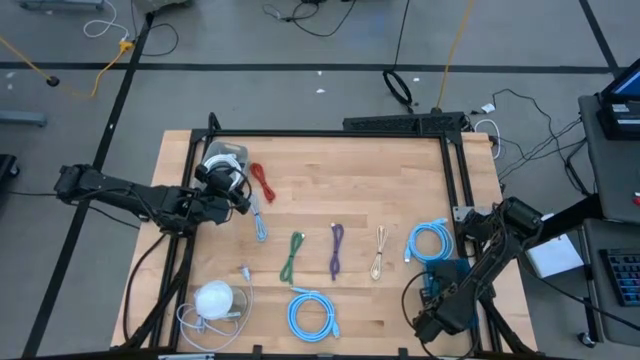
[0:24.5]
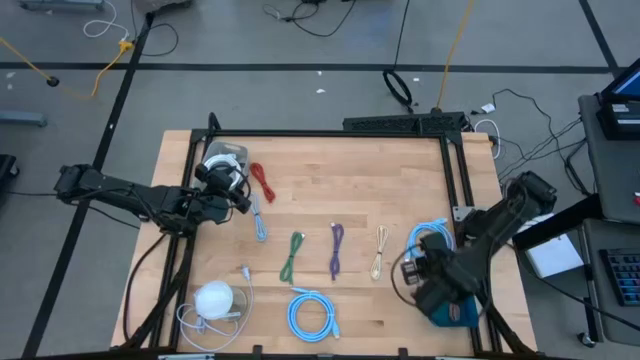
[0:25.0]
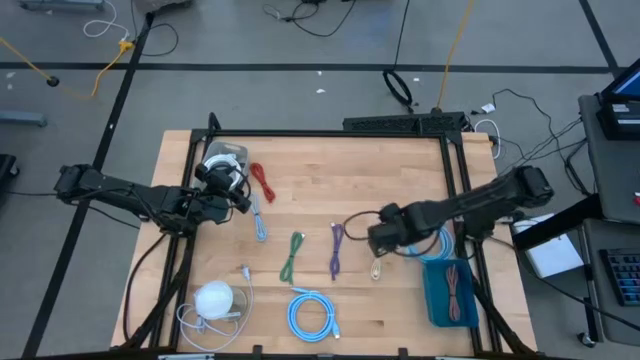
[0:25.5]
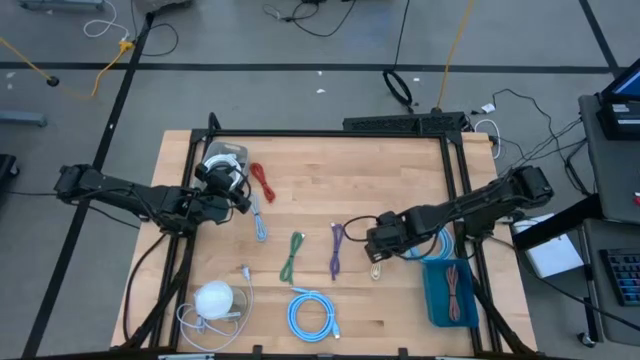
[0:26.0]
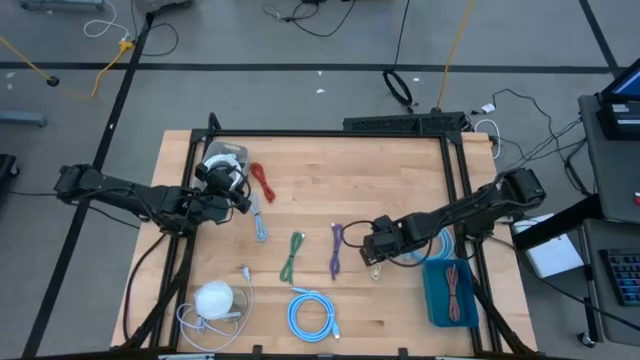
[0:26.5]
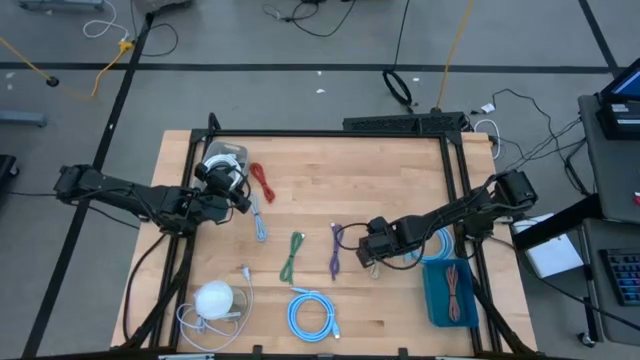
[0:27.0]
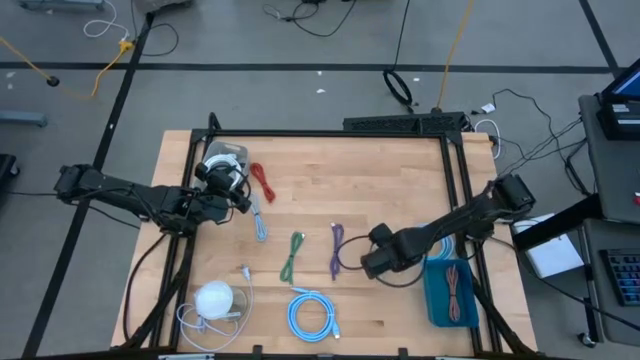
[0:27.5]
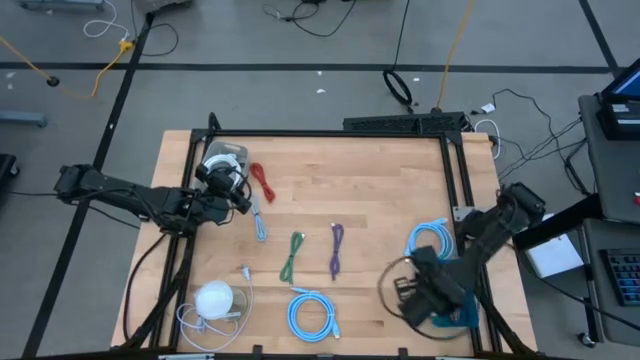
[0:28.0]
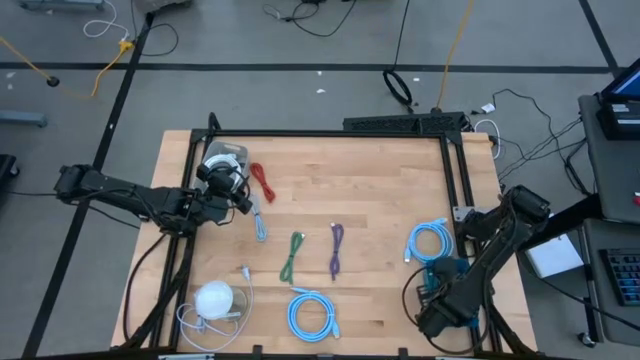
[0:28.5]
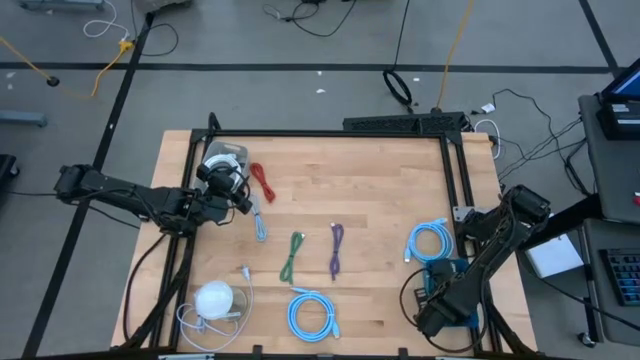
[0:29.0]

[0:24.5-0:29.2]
Task: Pick & Place USB Port
Put the white USB cable into the blue basket

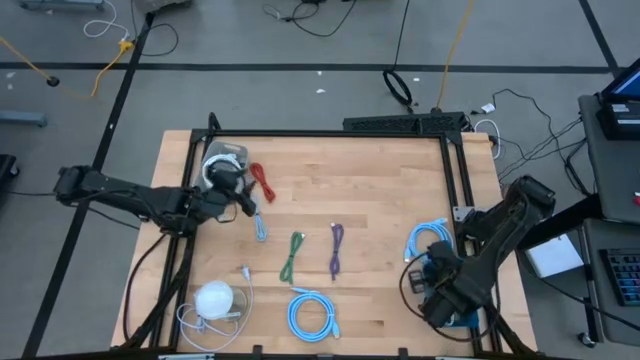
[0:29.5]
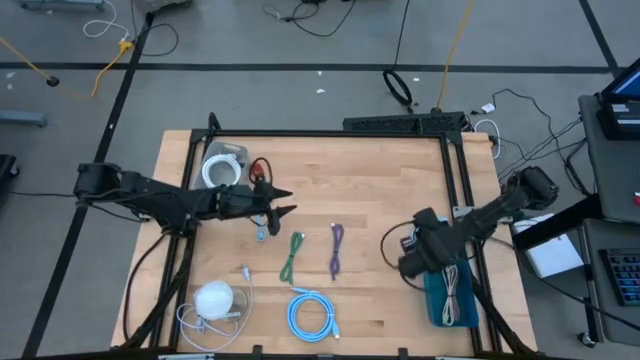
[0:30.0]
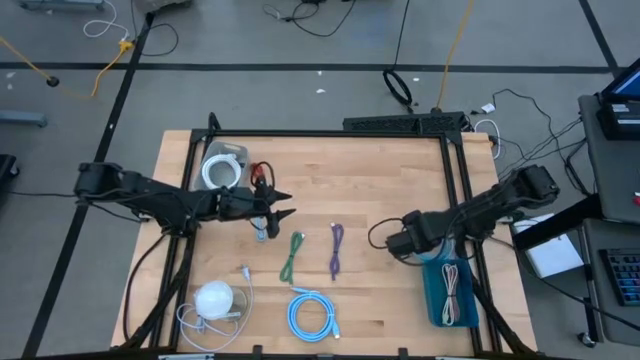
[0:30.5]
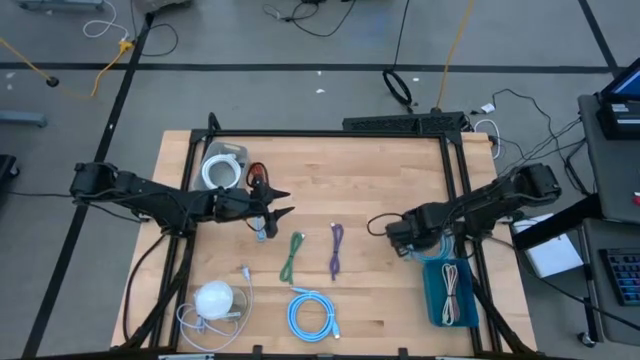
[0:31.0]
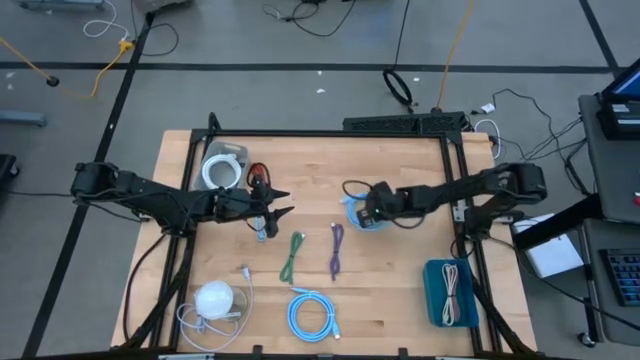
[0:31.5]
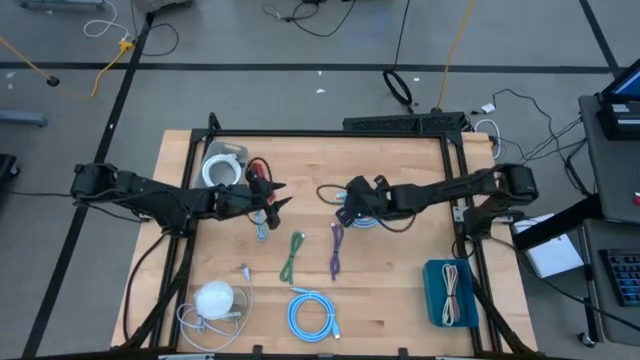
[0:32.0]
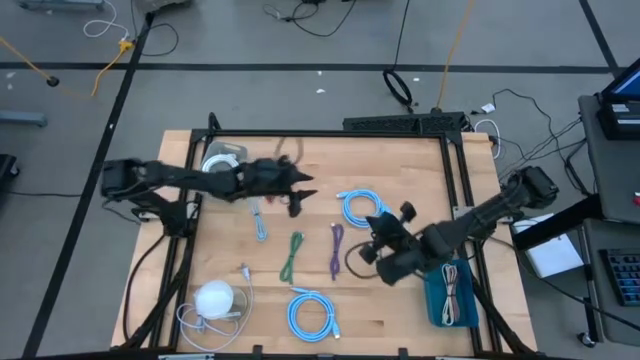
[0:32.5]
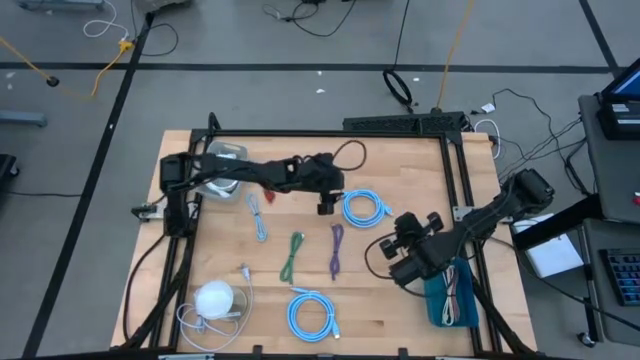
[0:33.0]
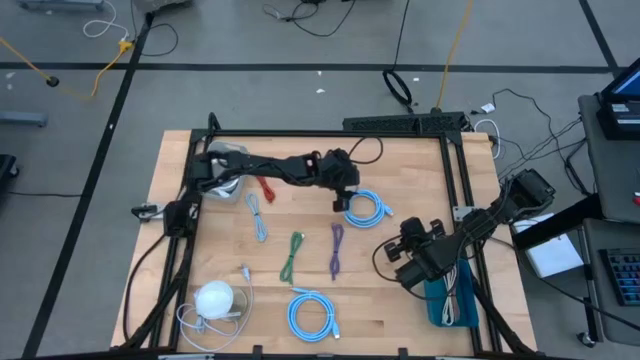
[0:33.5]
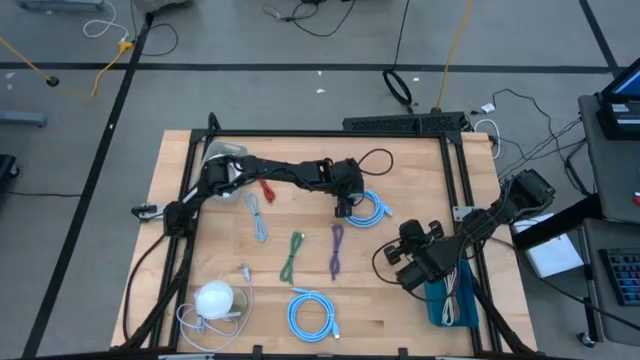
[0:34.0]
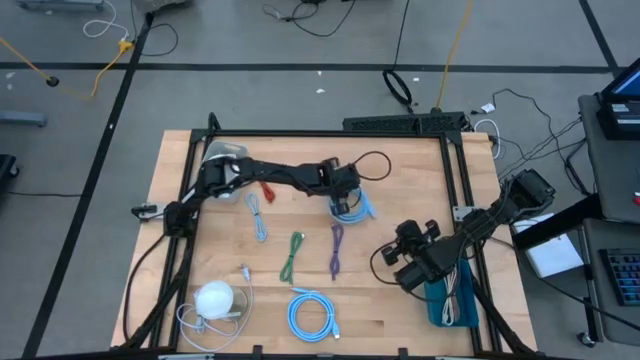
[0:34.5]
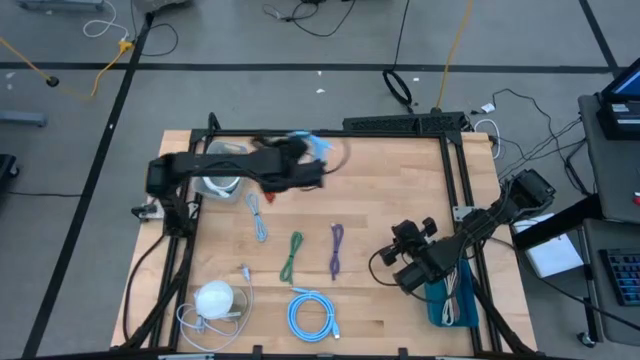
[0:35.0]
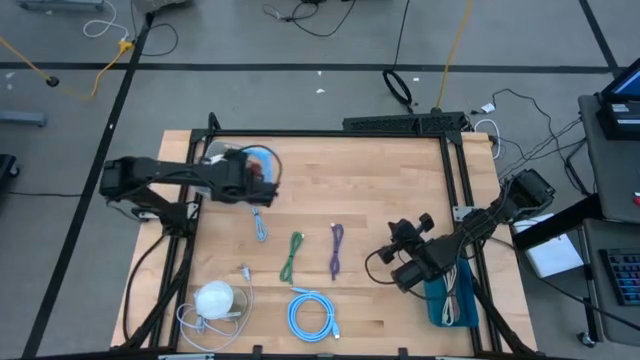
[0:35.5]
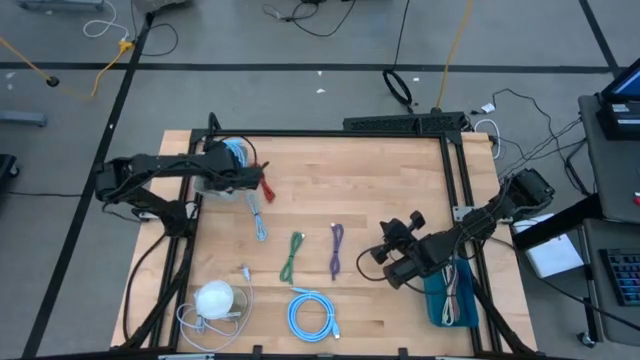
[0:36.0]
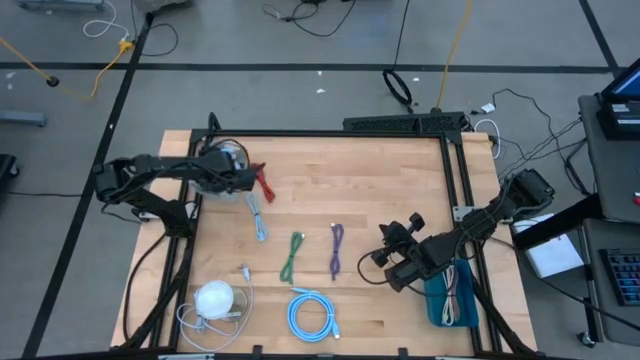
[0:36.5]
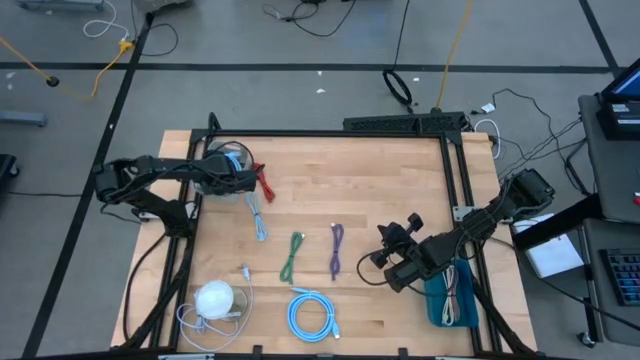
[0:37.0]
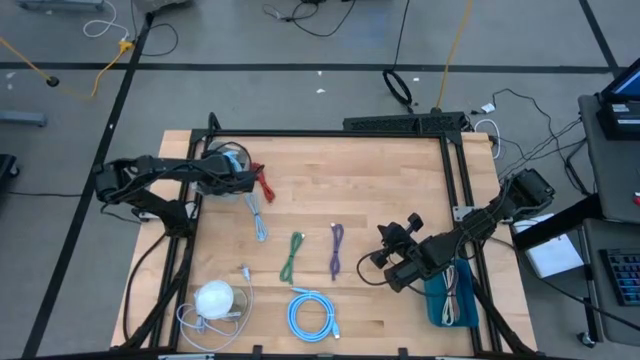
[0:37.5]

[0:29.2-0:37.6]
Put the top right blue HDMI cable into the gray basket

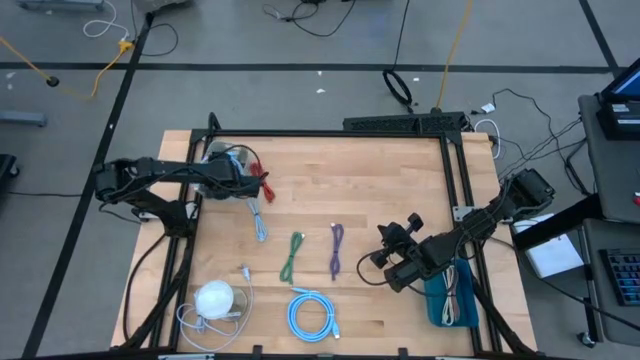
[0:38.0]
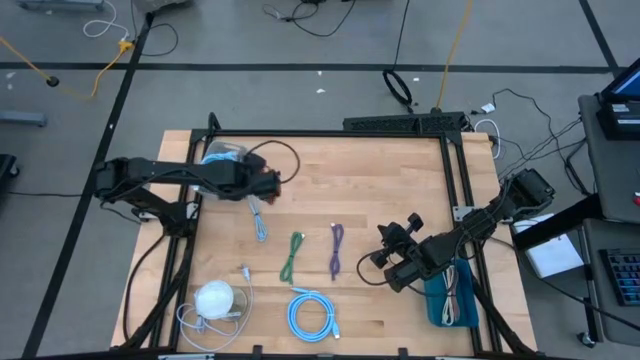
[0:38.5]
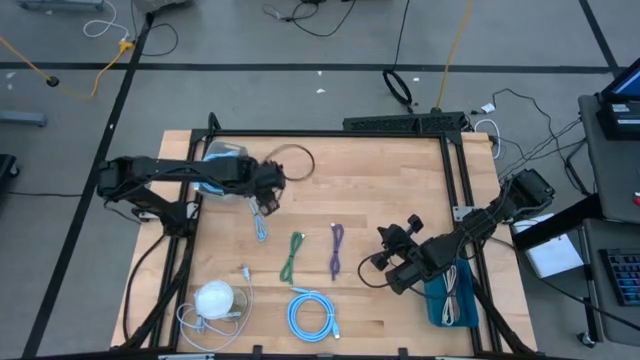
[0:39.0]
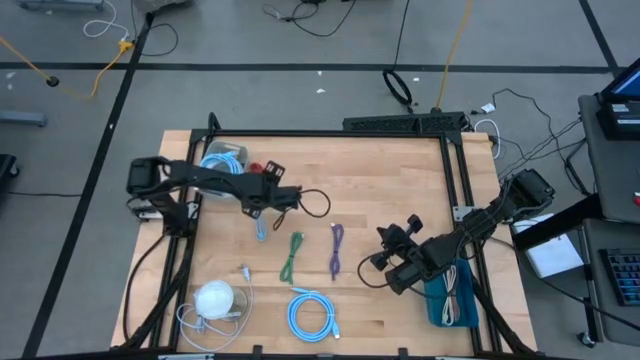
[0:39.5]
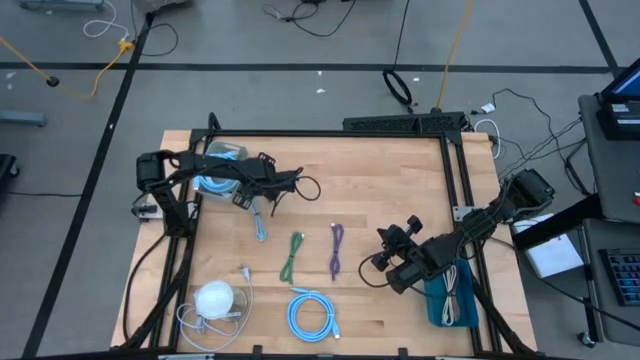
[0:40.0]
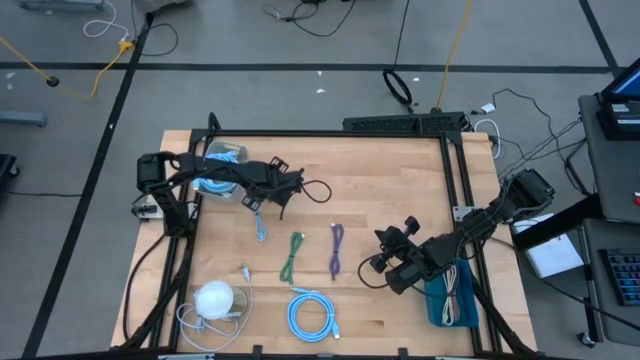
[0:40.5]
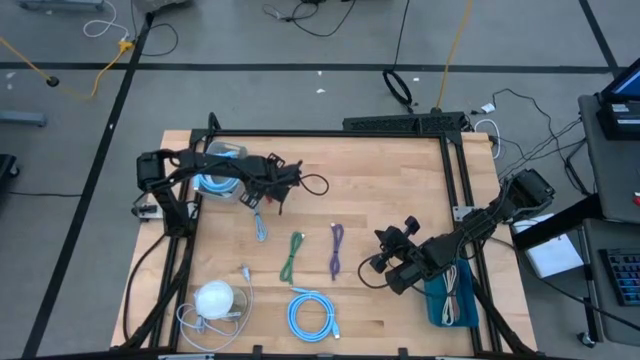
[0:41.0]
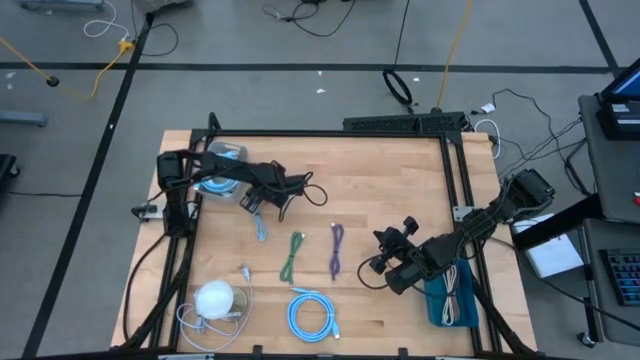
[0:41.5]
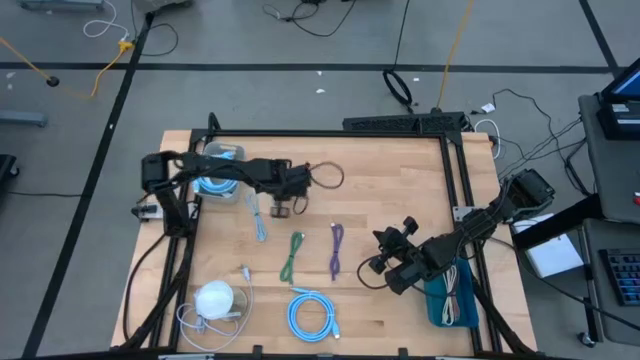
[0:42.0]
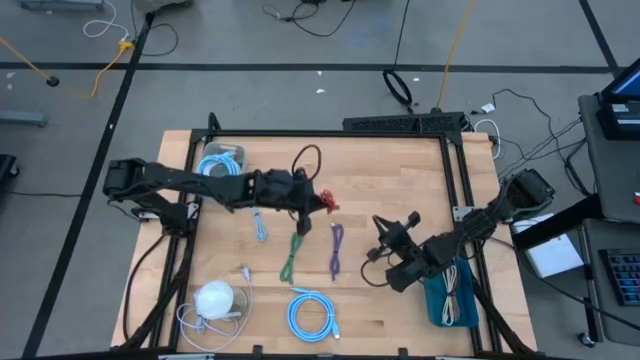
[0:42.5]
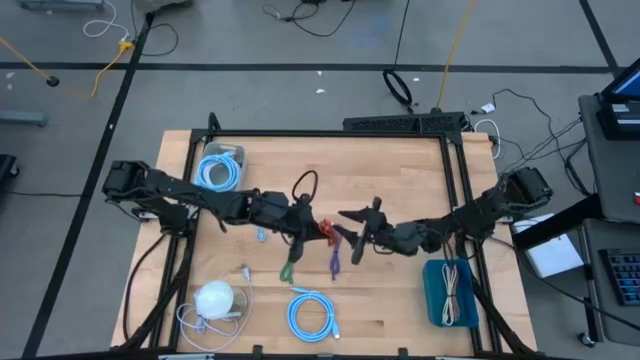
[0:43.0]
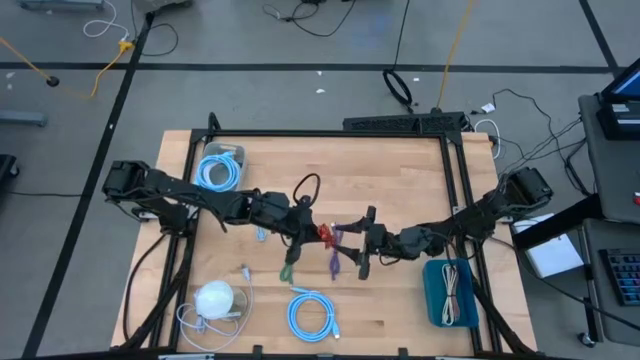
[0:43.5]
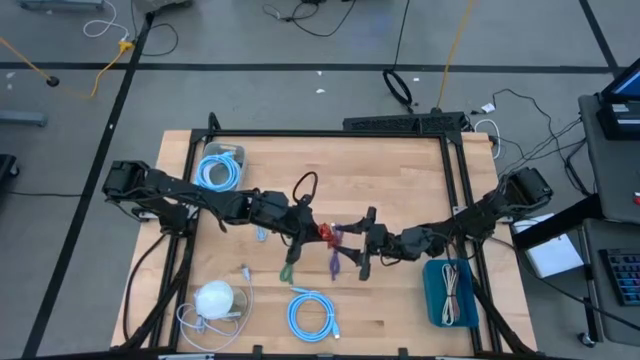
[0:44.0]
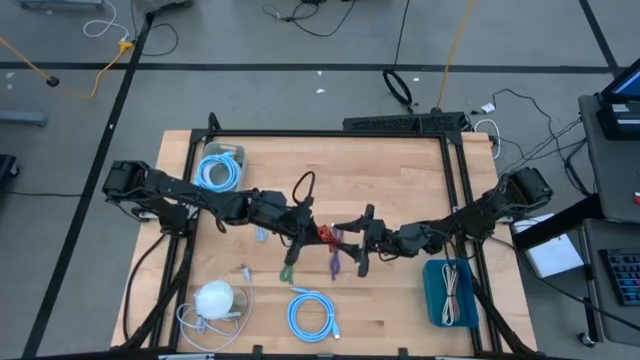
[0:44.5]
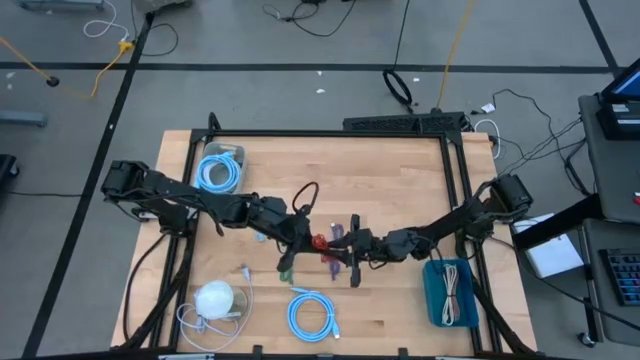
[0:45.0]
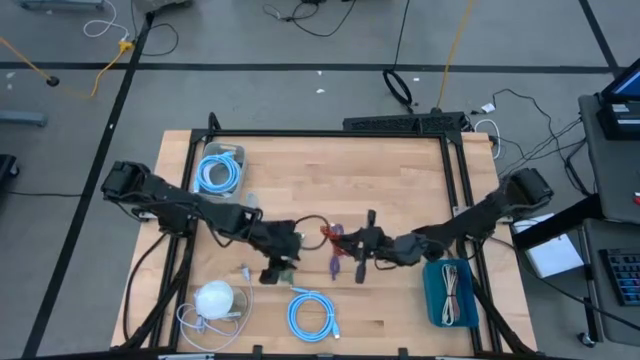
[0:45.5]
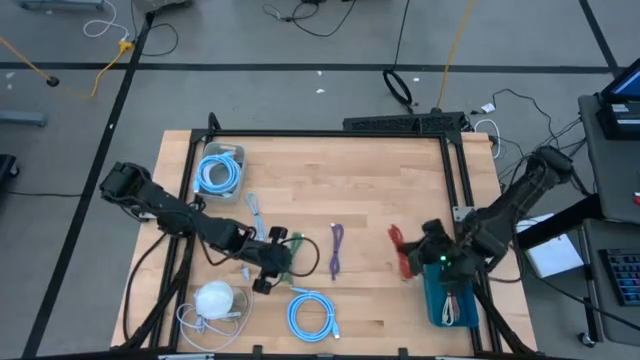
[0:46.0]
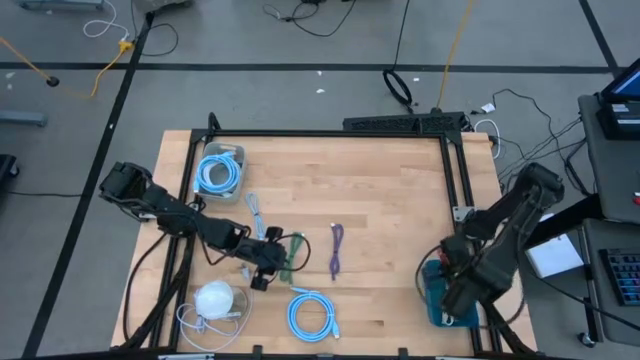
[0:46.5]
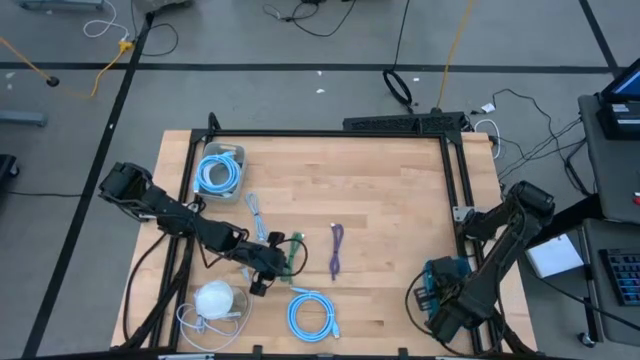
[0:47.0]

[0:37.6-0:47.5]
Put the orange USB cable into the blue basket
